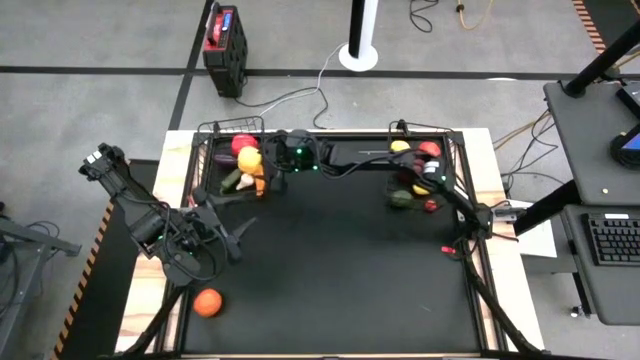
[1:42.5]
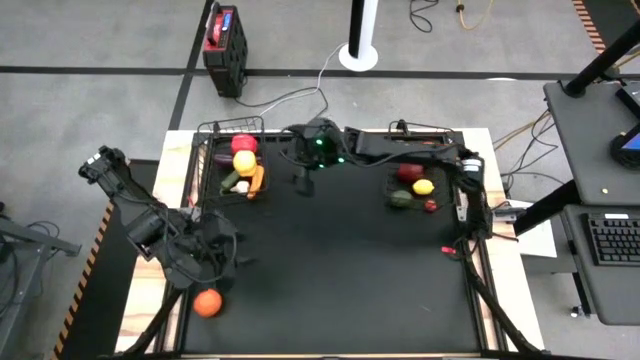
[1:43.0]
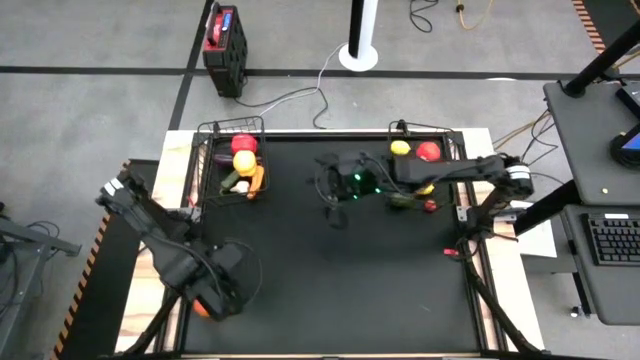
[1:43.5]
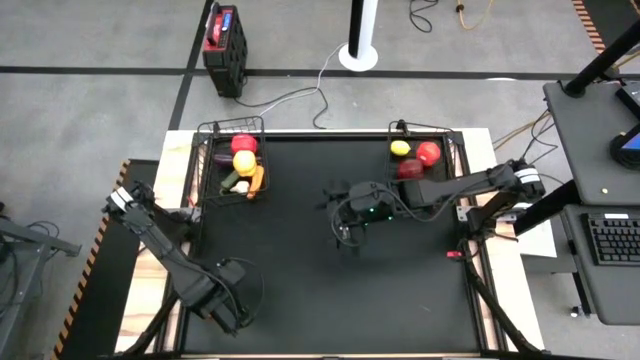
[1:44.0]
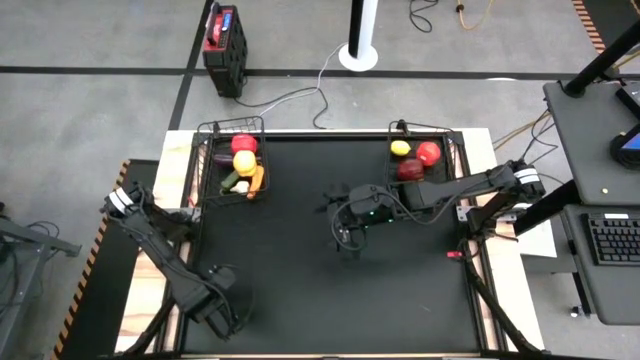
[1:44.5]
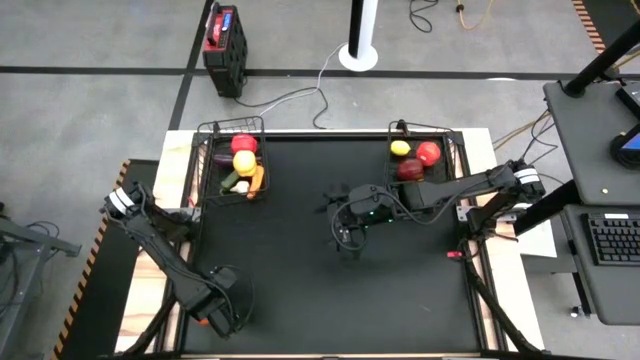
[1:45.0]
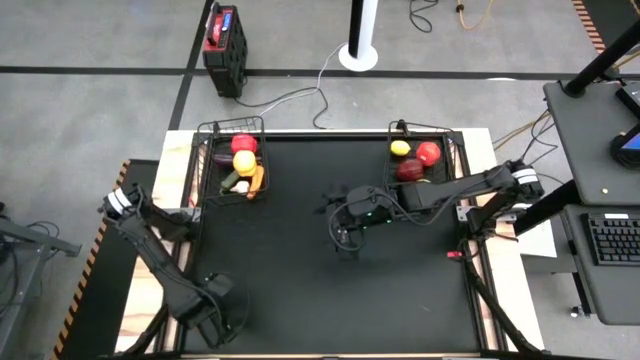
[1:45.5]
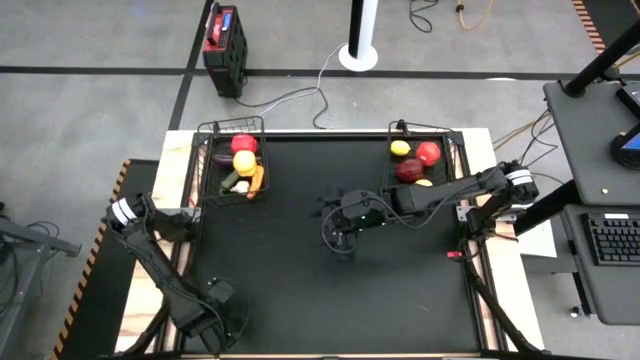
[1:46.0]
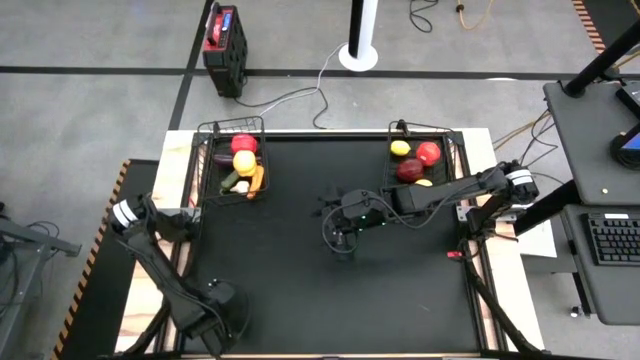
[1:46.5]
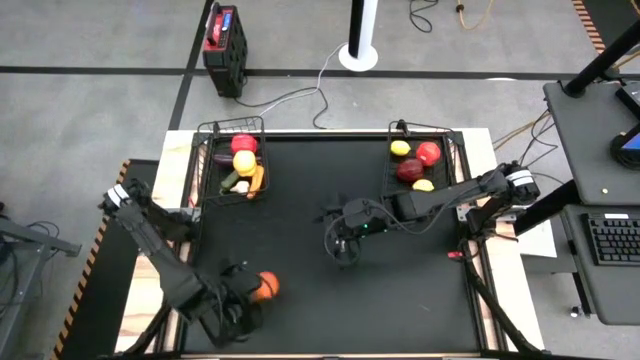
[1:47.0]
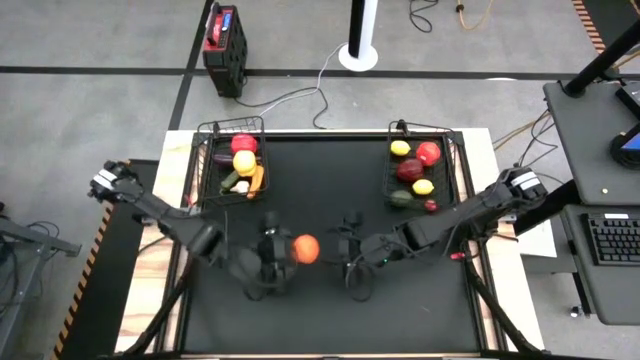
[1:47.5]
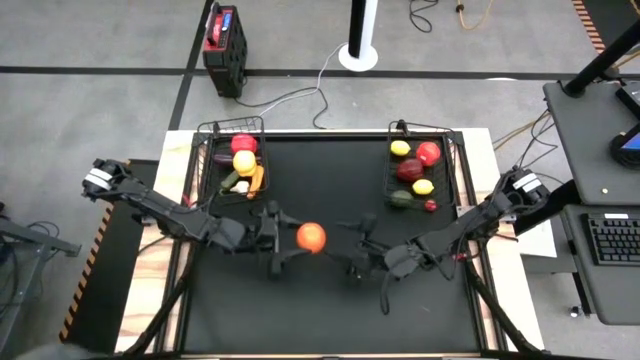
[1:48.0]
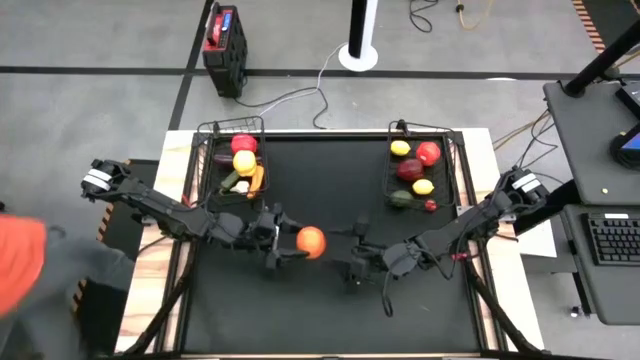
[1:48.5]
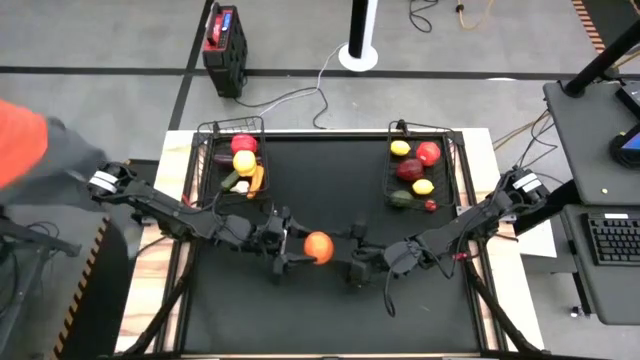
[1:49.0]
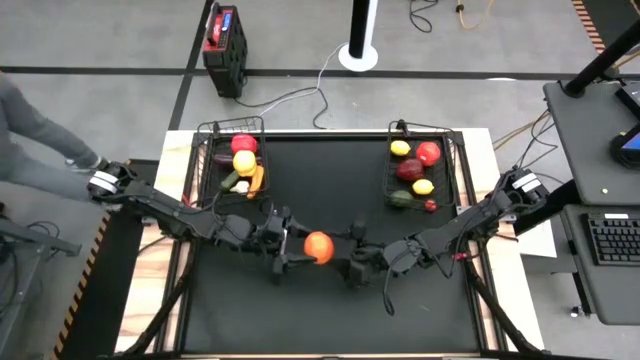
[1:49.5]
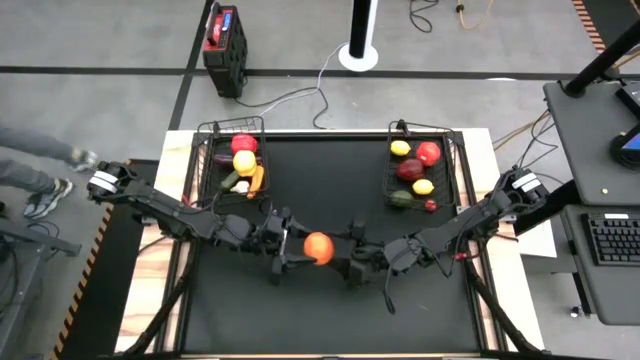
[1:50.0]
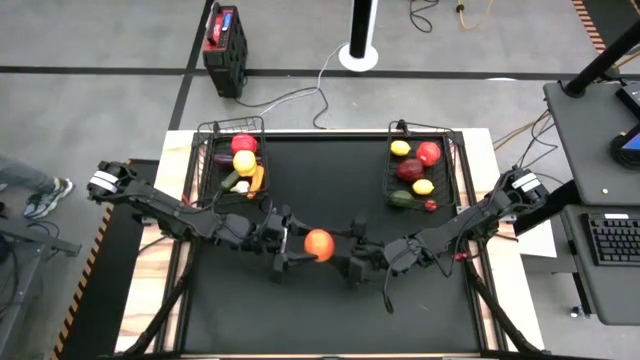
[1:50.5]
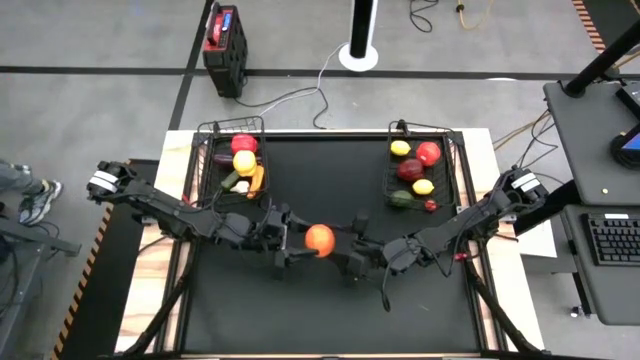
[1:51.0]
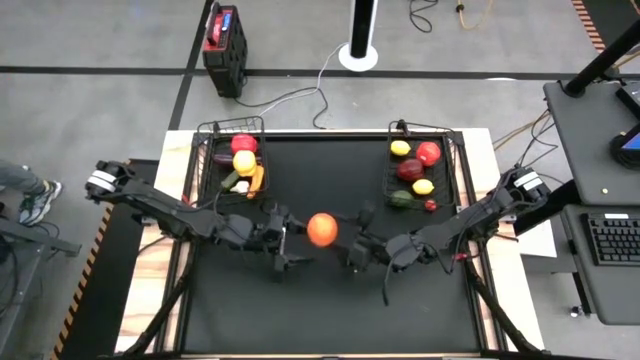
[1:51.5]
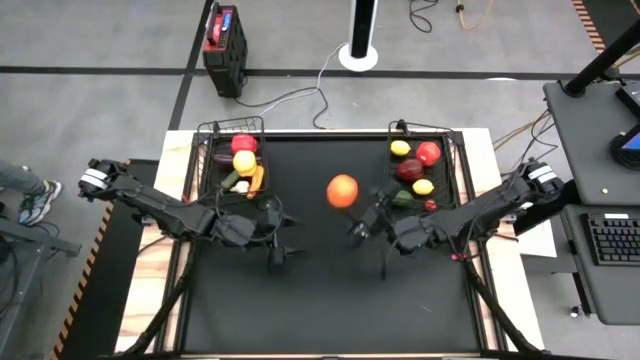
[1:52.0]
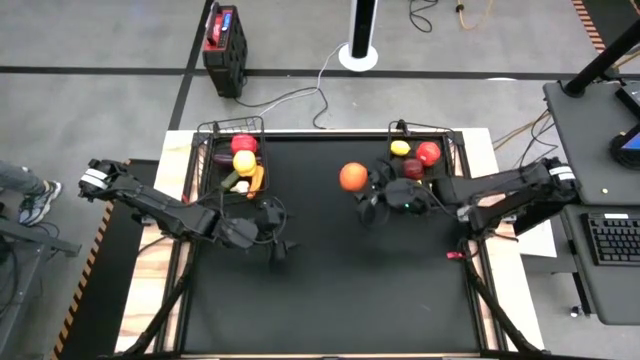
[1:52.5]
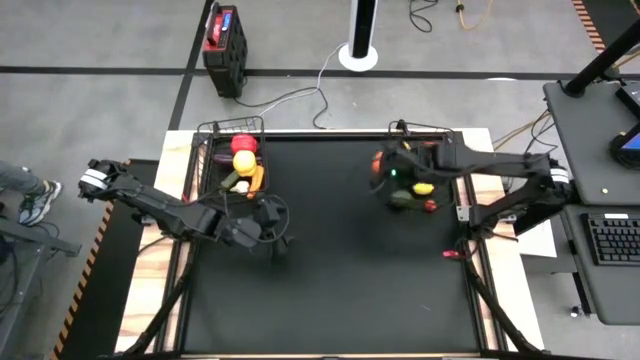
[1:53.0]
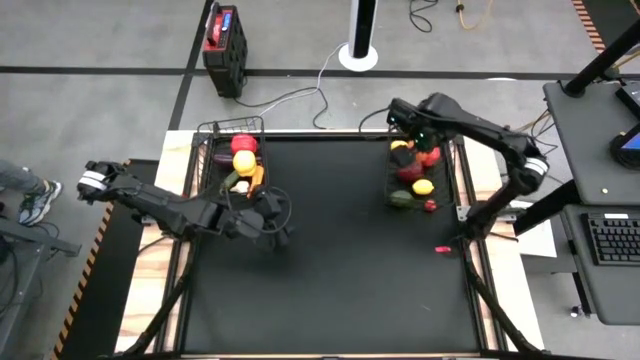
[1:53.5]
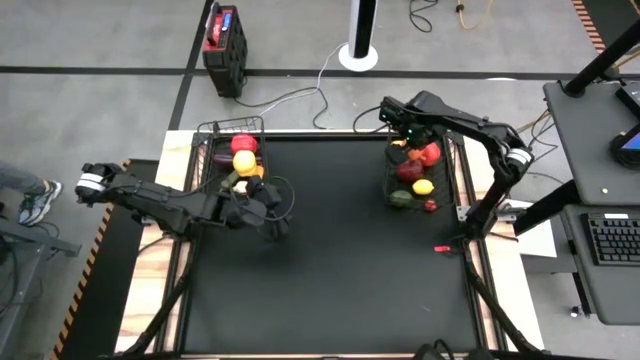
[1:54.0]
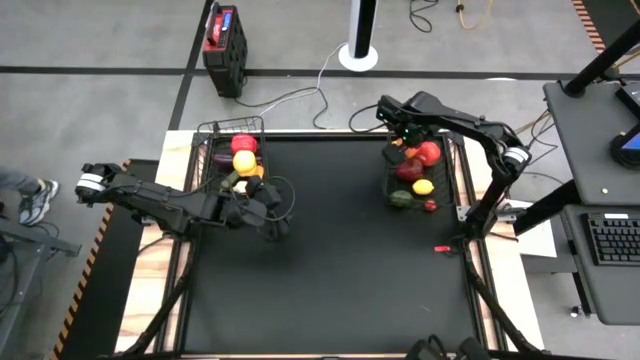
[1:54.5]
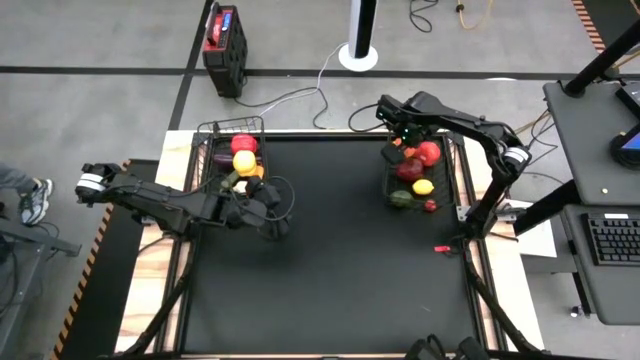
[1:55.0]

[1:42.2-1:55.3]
Task: Sort produce into baskets
Put the orange into the right basket

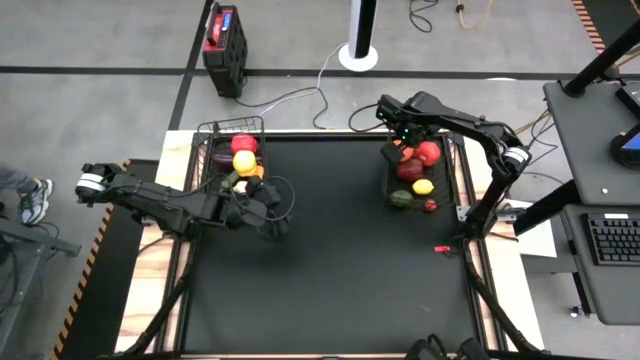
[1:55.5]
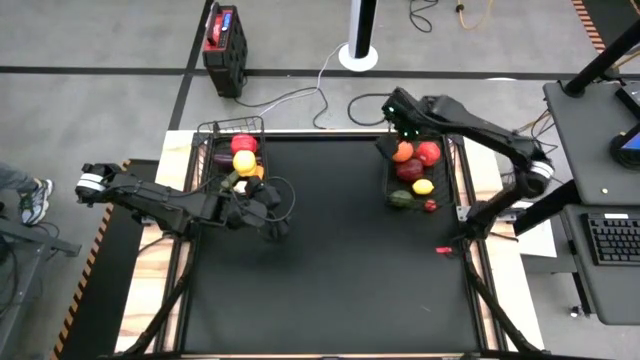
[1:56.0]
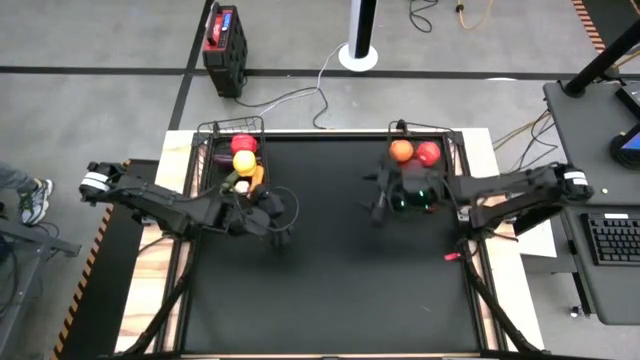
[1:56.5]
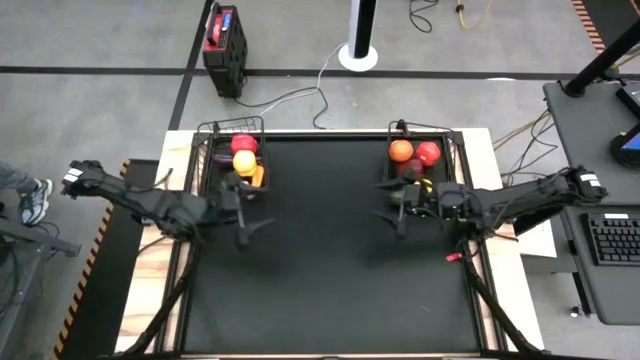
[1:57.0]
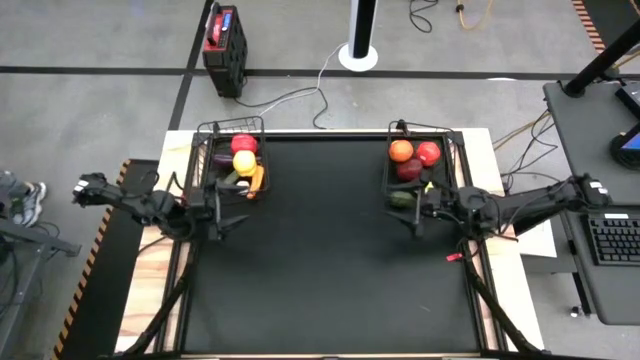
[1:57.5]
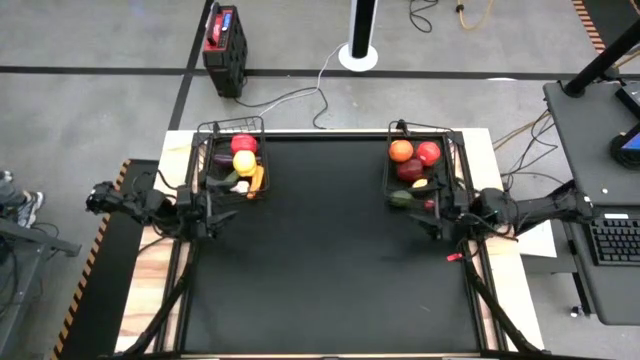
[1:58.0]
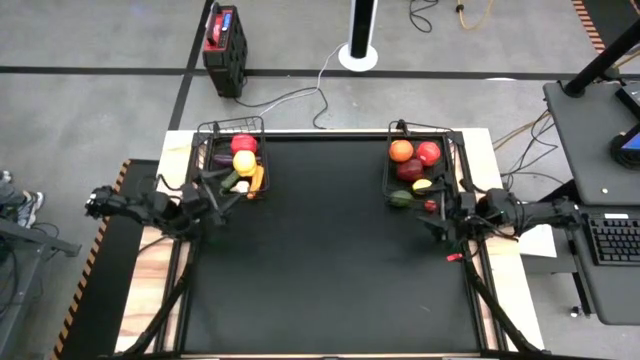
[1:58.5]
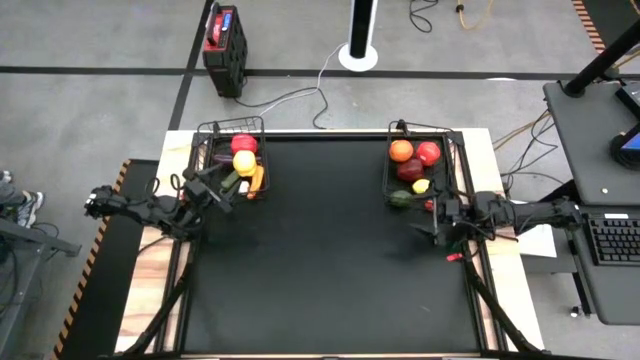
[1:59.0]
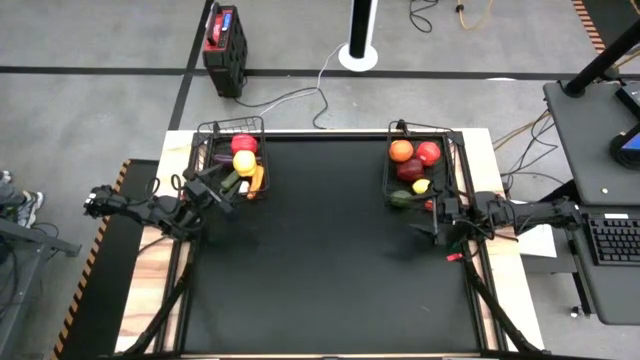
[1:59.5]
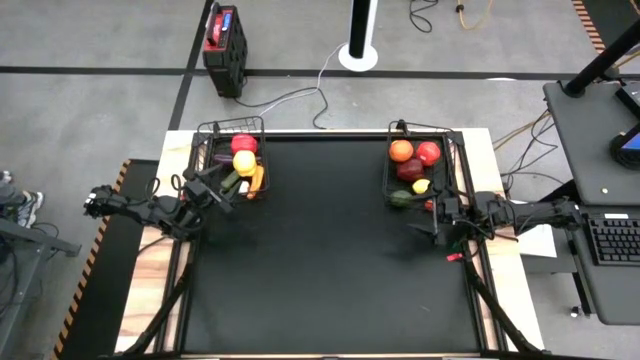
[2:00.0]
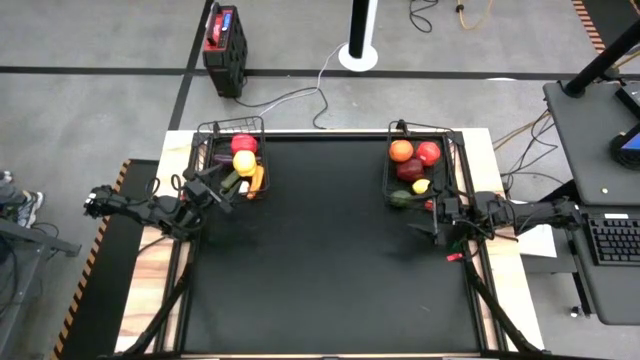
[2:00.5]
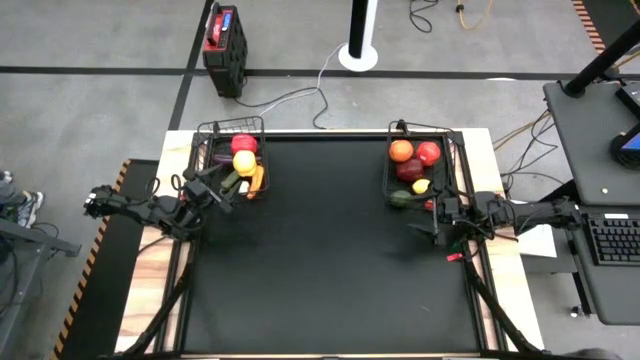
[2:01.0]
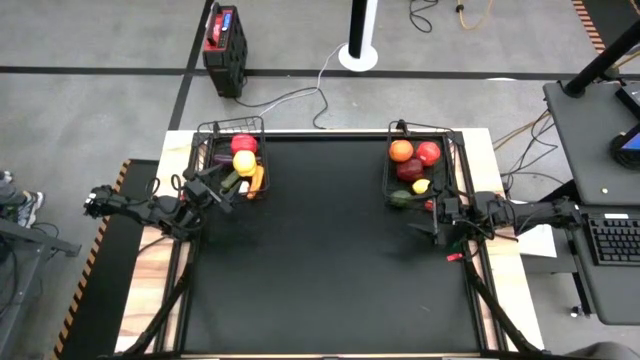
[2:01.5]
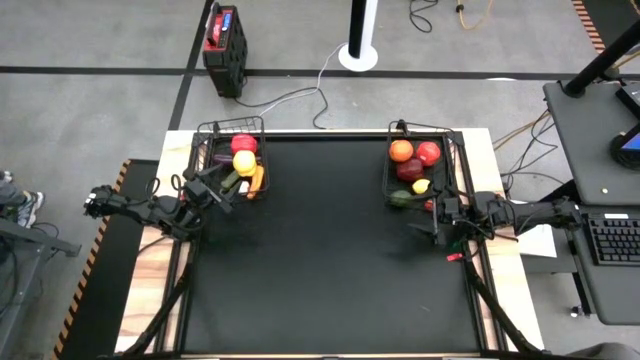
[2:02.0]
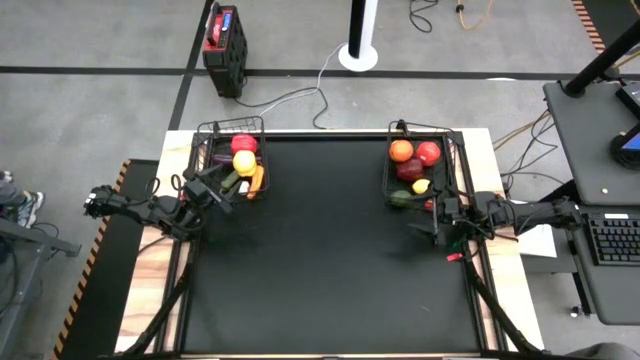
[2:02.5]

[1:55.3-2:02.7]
Return to Home Position

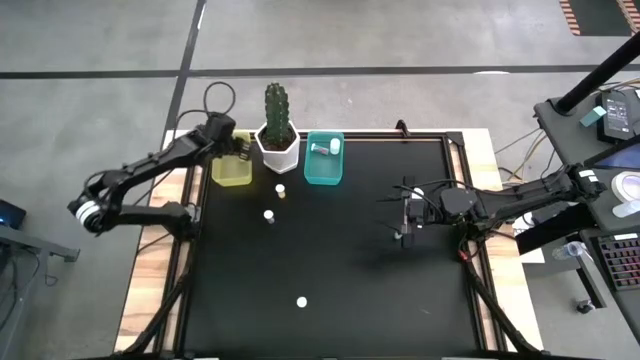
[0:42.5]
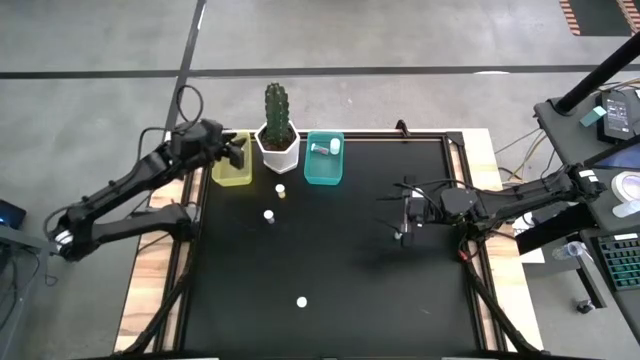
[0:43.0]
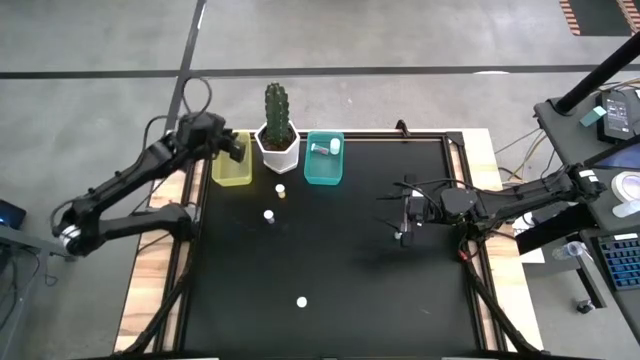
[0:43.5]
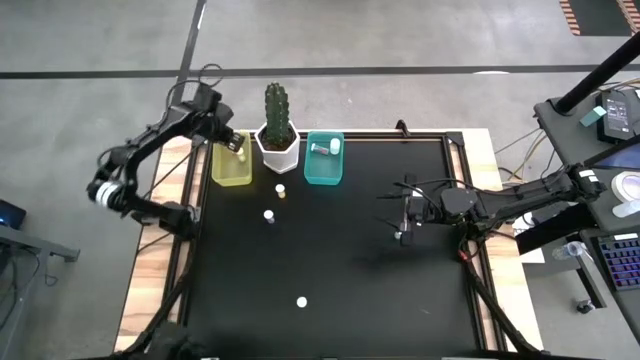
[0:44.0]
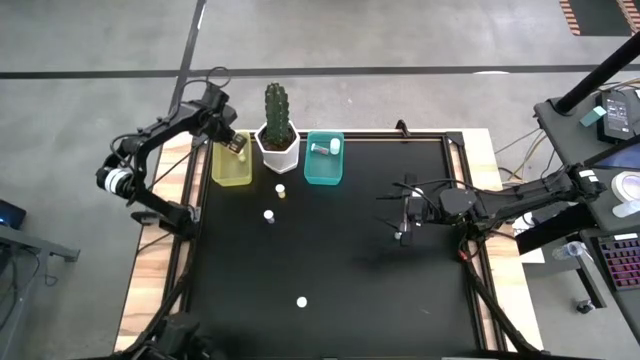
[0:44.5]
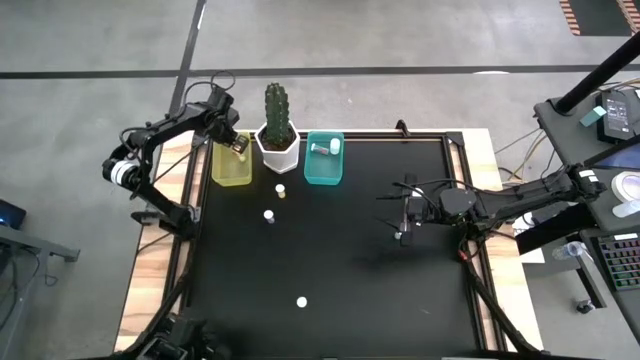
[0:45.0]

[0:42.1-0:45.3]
Task: Pick and place medicine bottles into bin by pill shape (circle, oval)
Adjust the pink tablet bottle into the yellow bin
